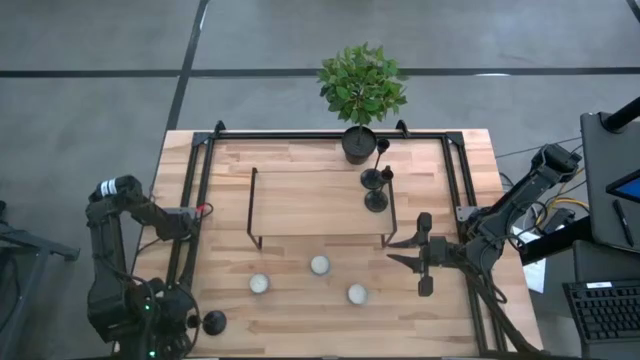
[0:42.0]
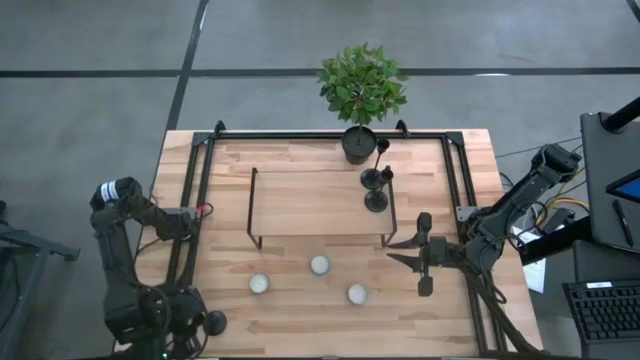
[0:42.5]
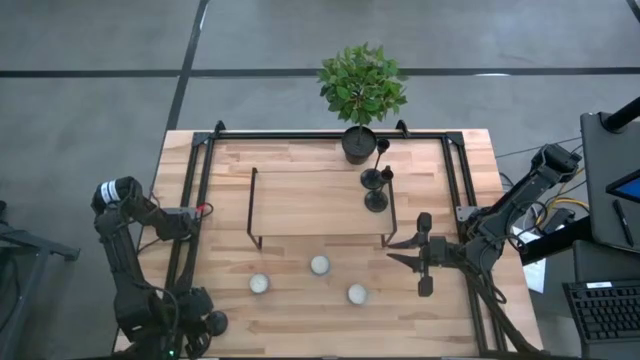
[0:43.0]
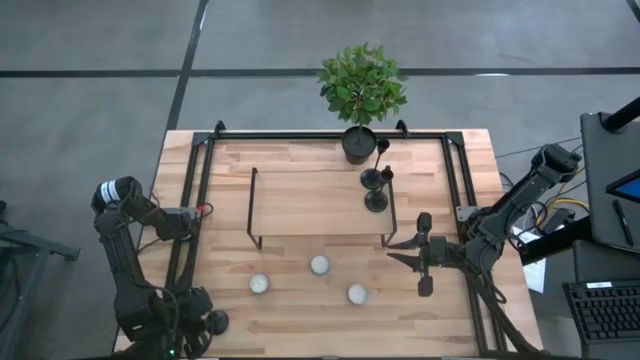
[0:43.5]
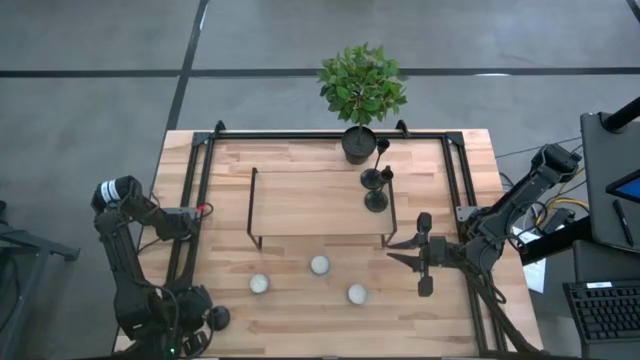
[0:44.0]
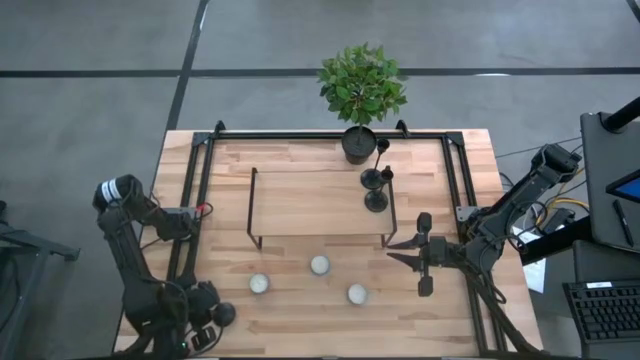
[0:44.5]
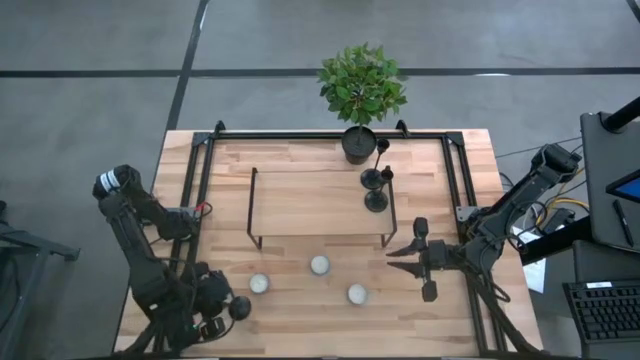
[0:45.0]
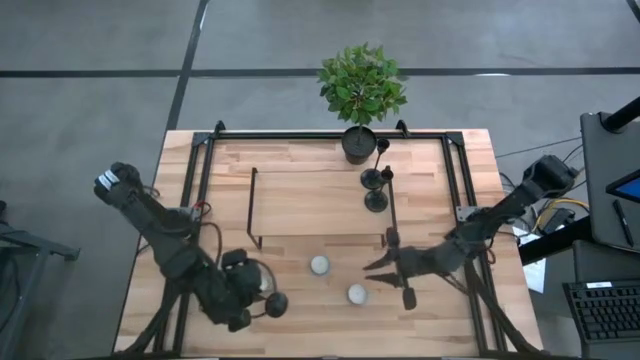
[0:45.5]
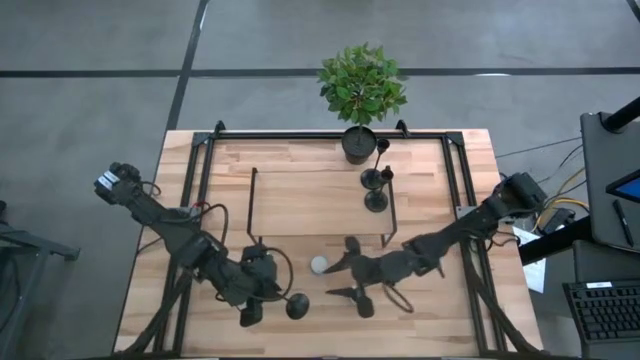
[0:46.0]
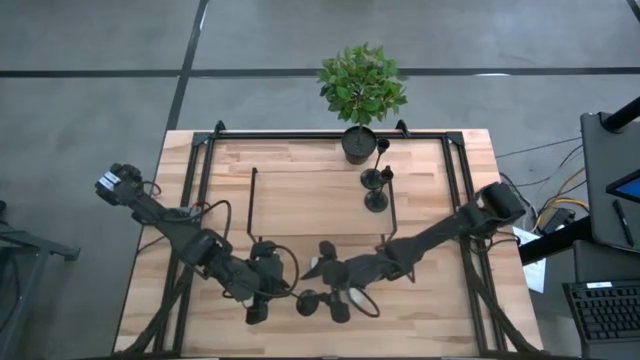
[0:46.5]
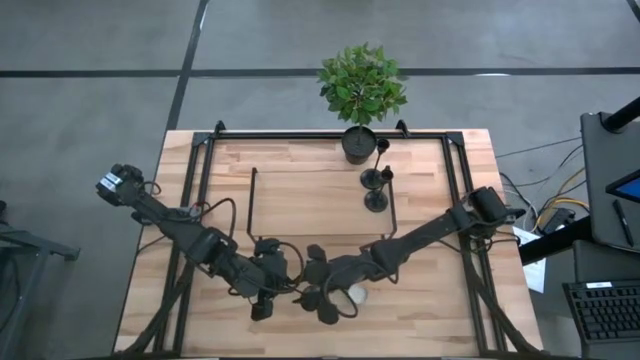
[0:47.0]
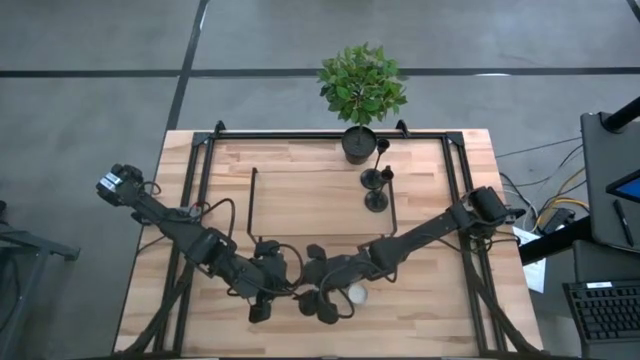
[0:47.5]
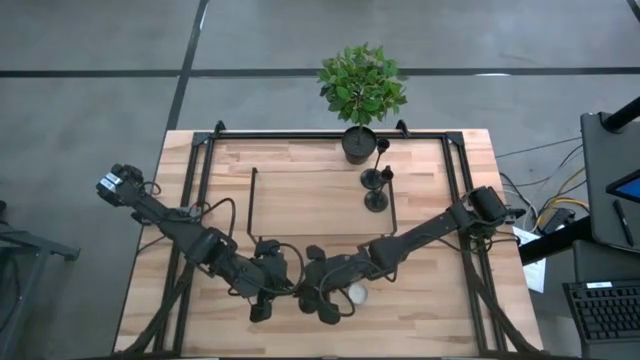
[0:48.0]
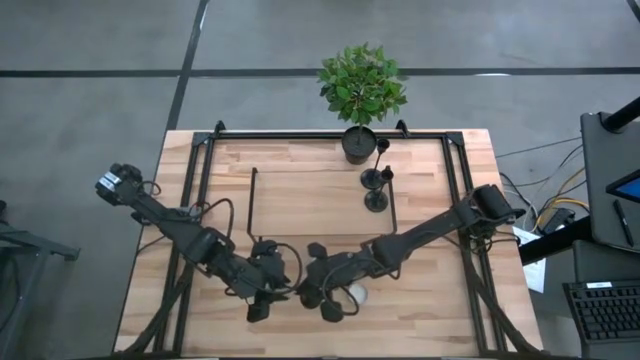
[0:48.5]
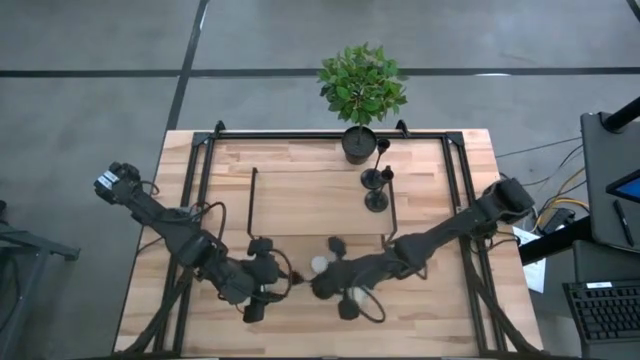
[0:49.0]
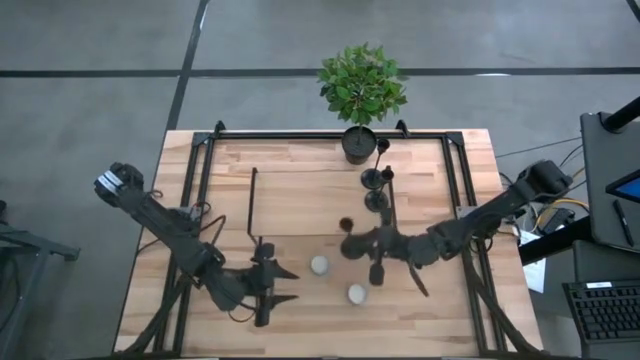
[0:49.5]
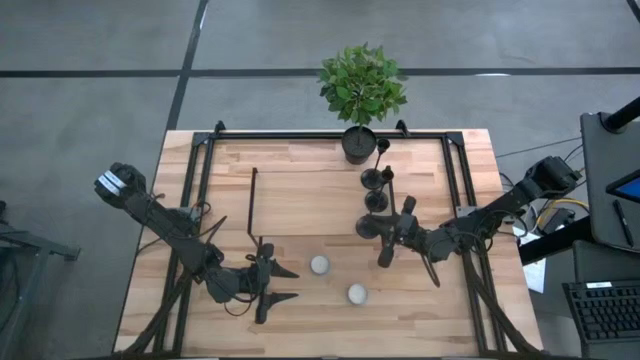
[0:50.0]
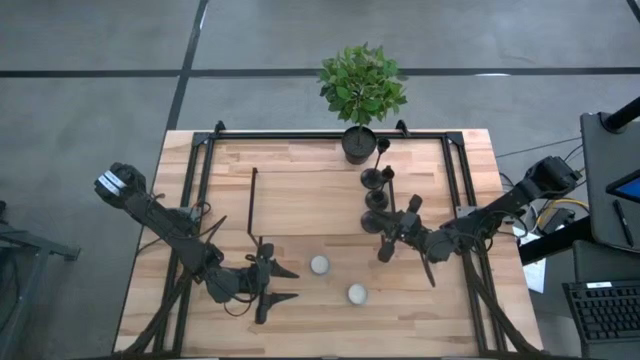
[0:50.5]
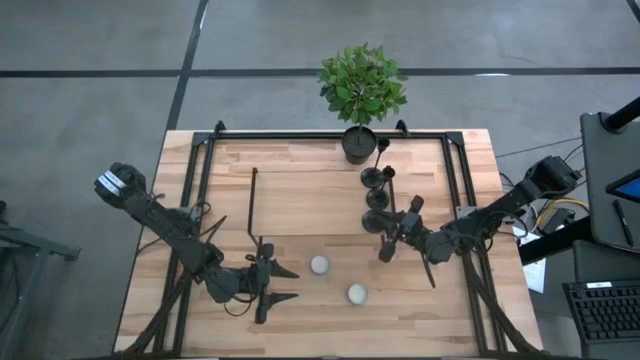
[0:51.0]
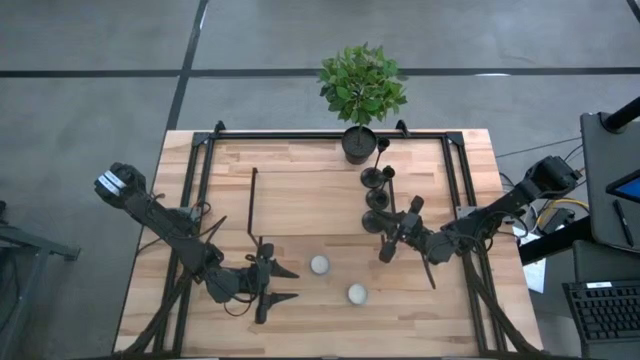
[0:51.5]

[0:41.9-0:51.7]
Task: Pick & Place candle stick holders
Put the black candle holder on the shelf aligned with the other black candle holders

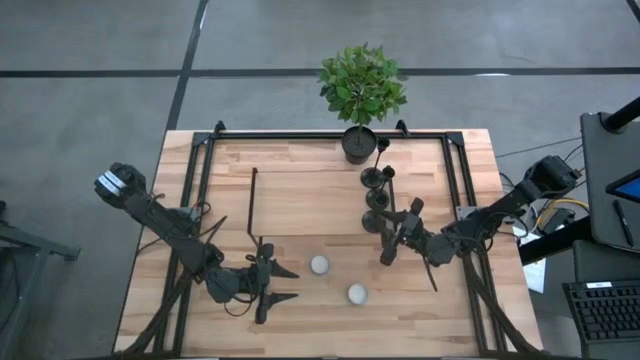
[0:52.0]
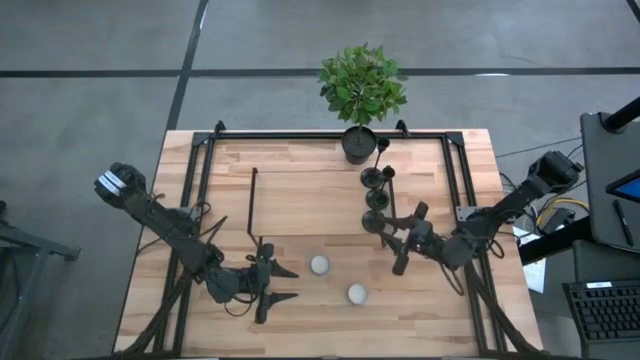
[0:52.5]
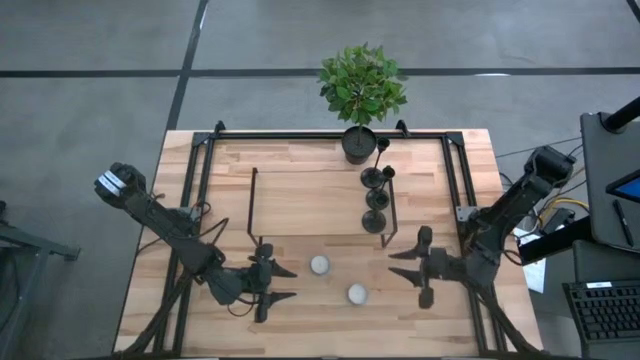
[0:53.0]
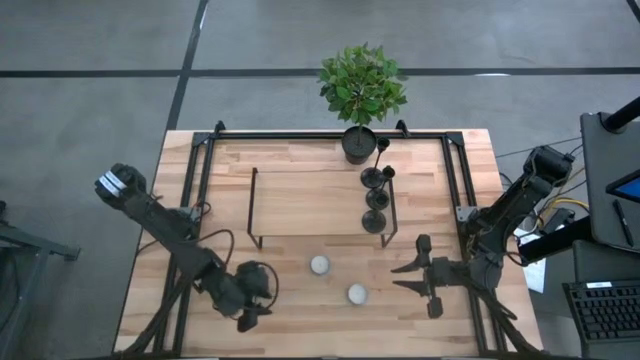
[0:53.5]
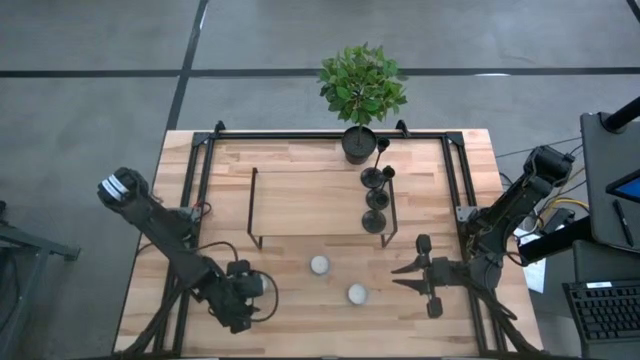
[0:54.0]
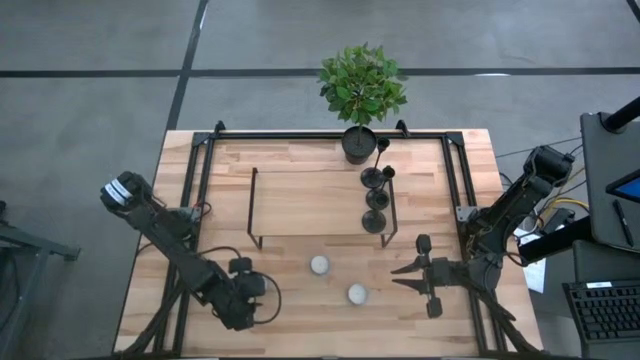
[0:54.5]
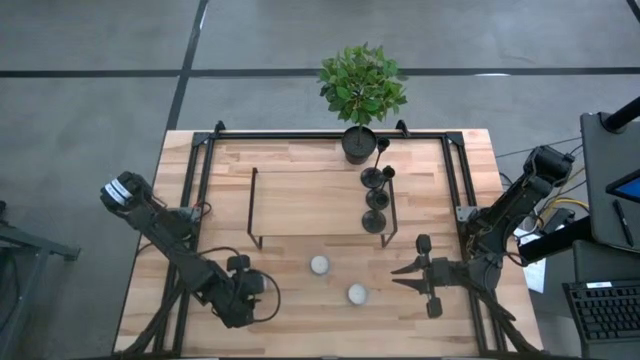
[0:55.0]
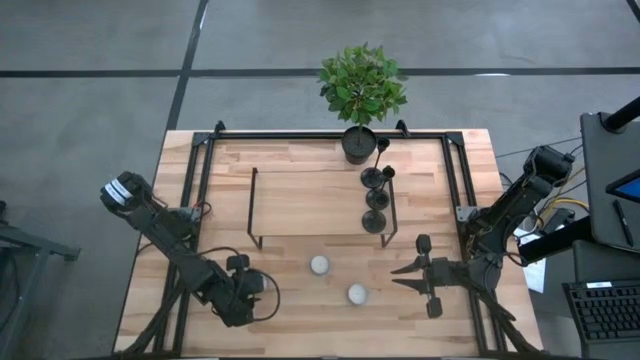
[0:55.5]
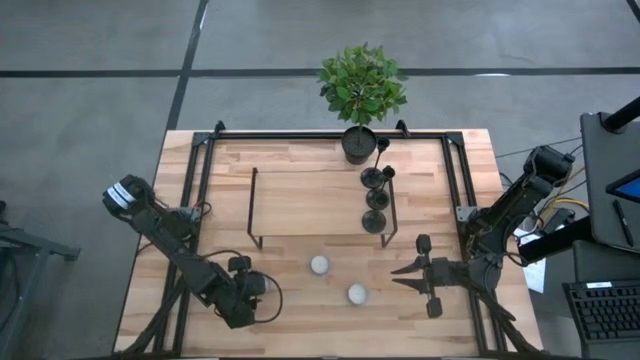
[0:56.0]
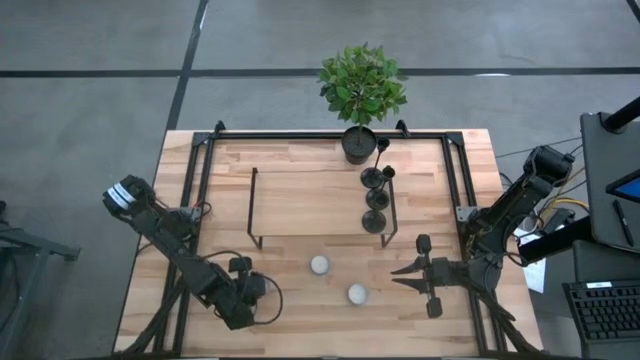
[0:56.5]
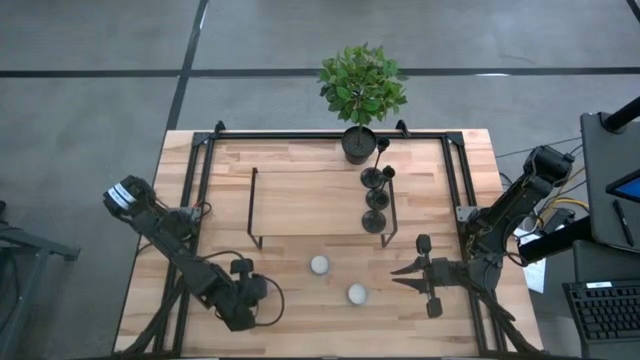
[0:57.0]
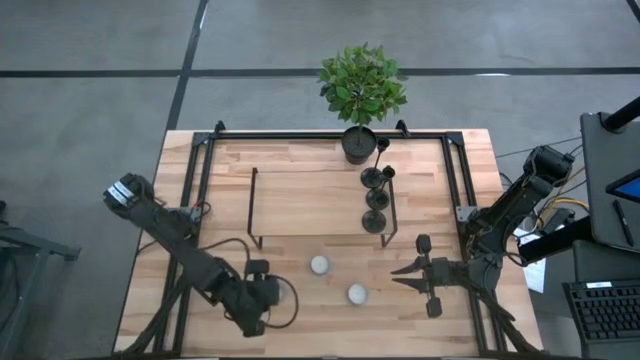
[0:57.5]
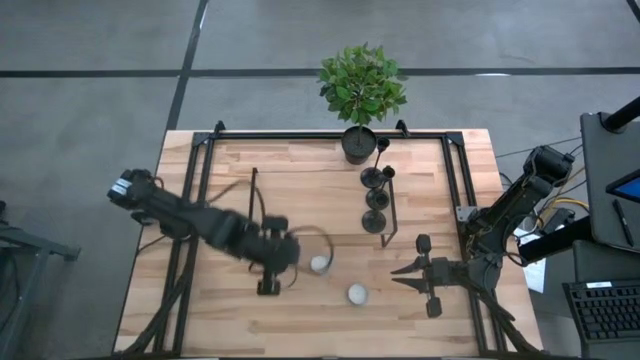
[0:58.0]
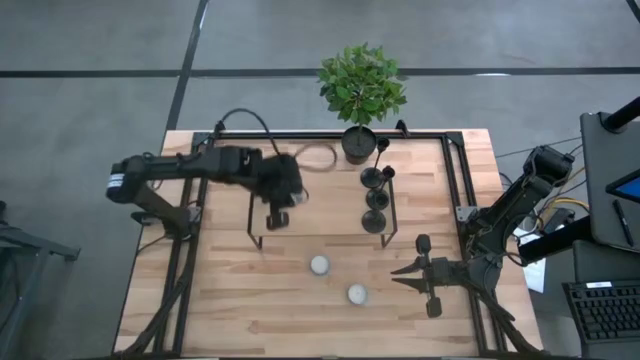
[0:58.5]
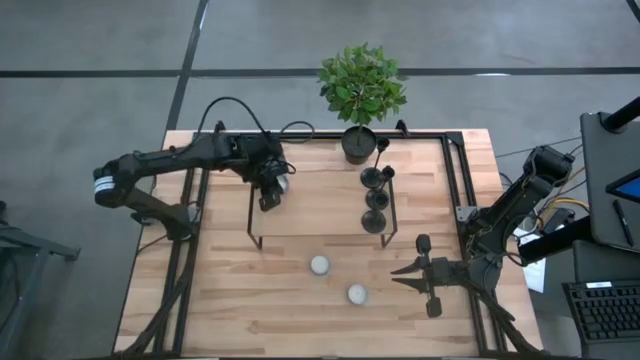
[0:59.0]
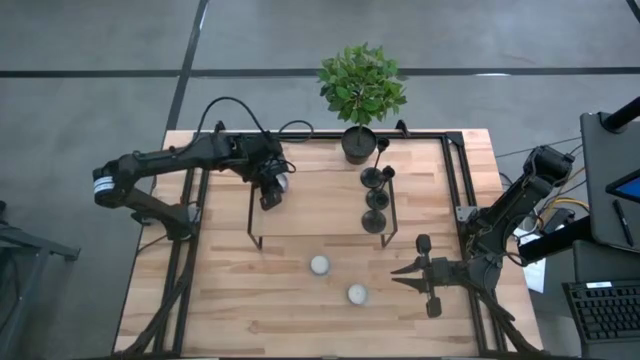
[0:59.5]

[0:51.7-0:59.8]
Put the pink scented black candle on the shelf

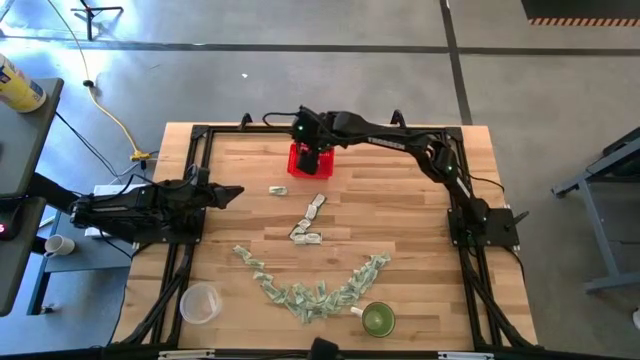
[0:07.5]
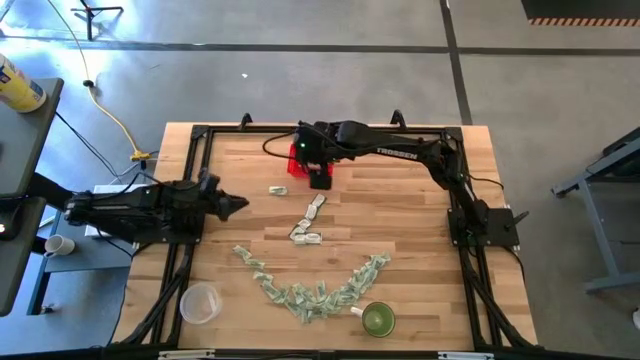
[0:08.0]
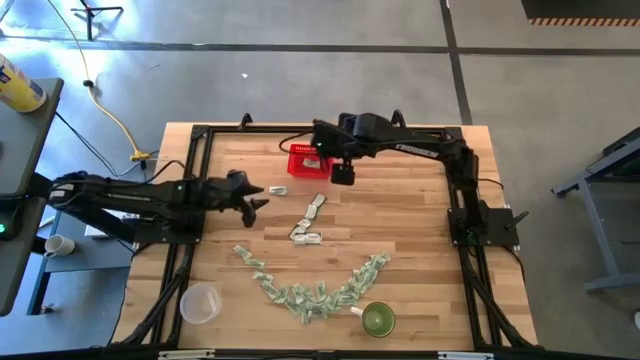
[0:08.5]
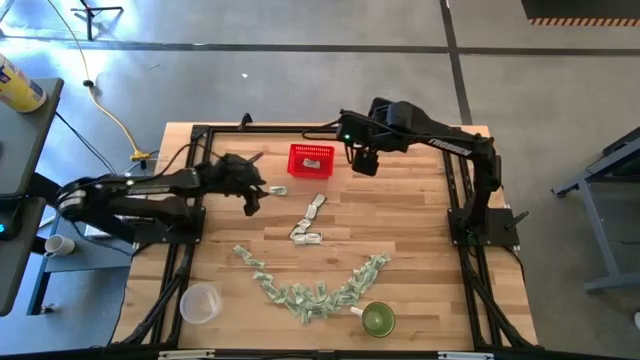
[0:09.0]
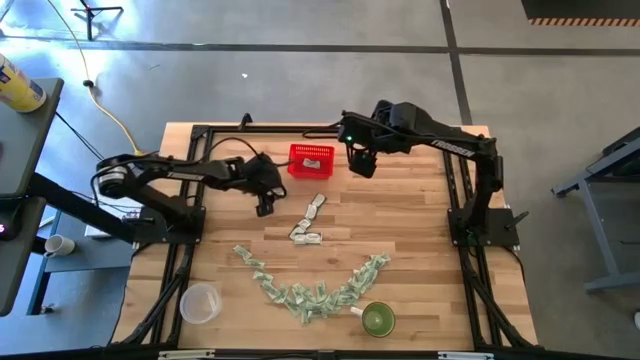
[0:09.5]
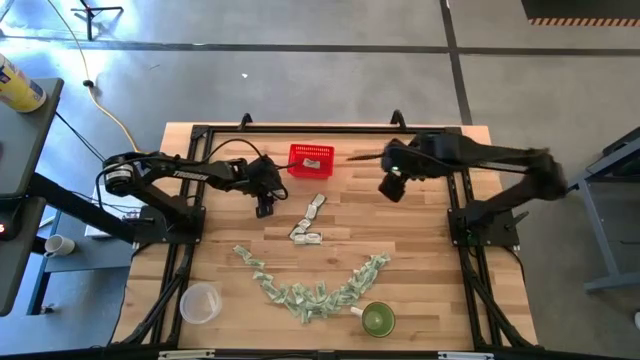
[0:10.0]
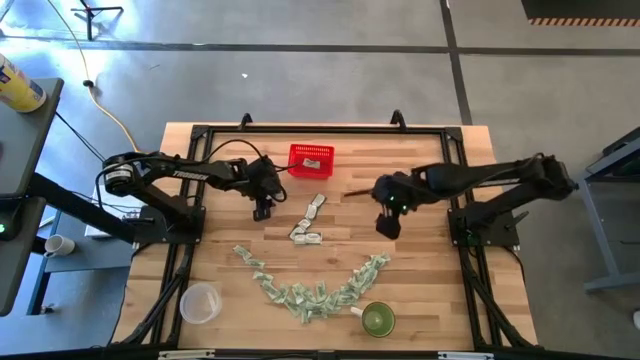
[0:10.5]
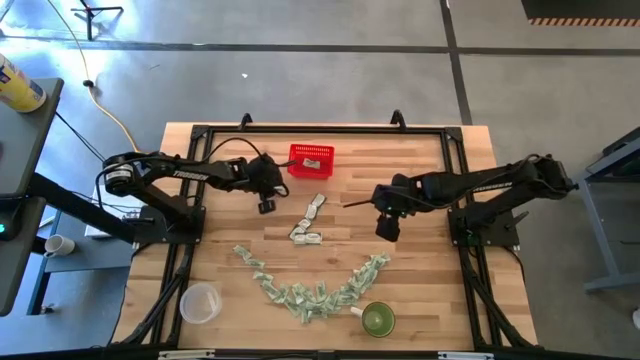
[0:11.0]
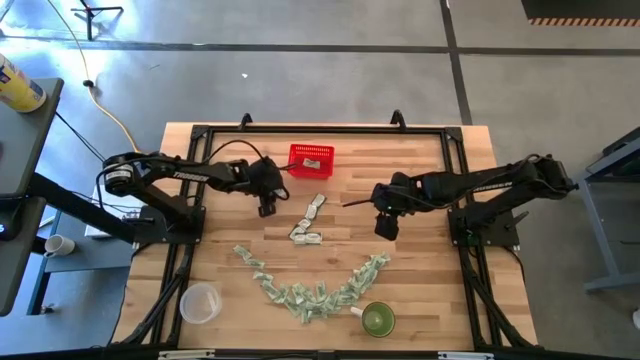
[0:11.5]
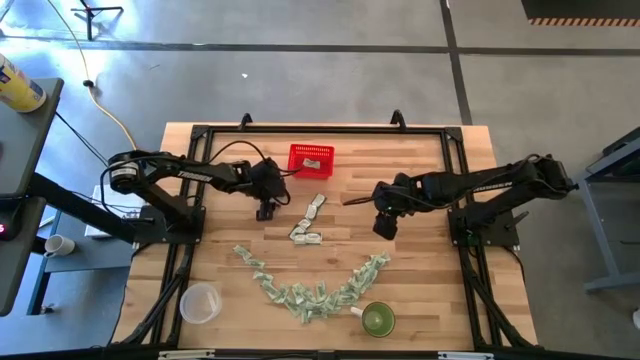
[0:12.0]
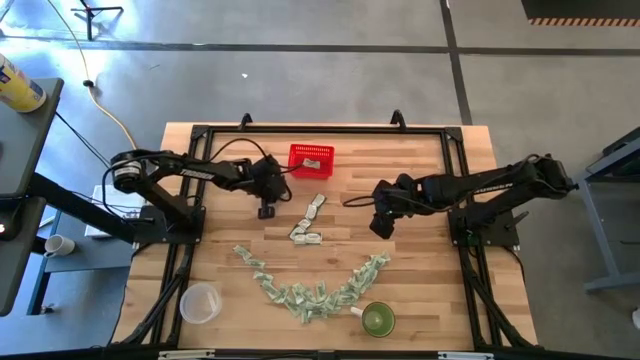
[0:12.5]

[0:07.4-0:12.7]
Task: Pick and place items into bin
Put the light green stevia packet into the red bin
